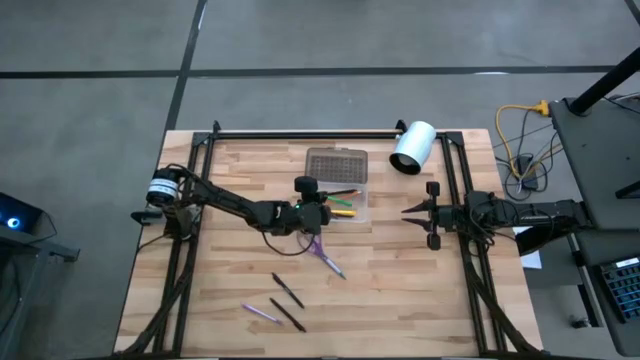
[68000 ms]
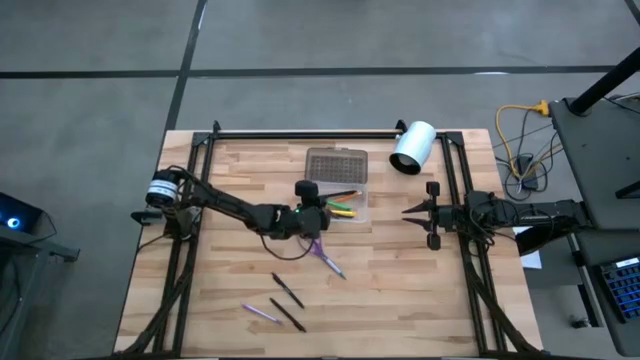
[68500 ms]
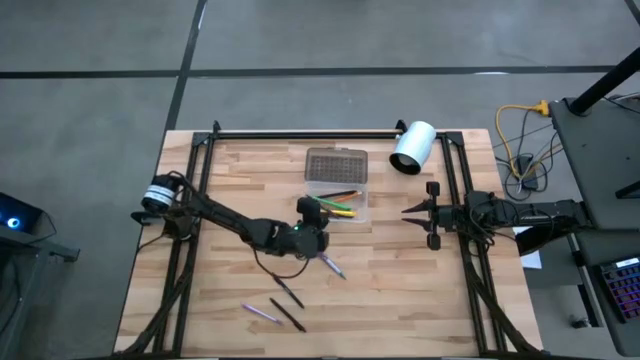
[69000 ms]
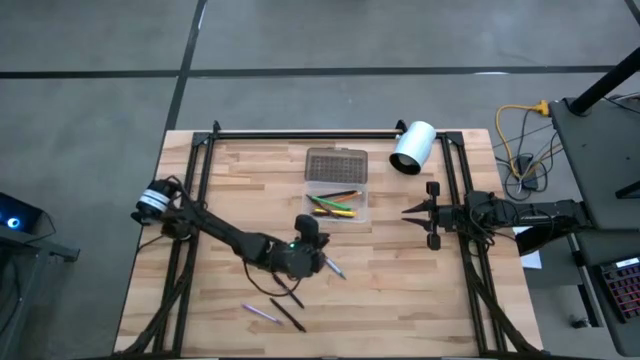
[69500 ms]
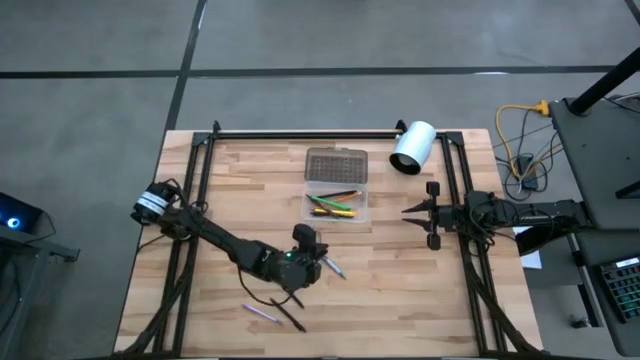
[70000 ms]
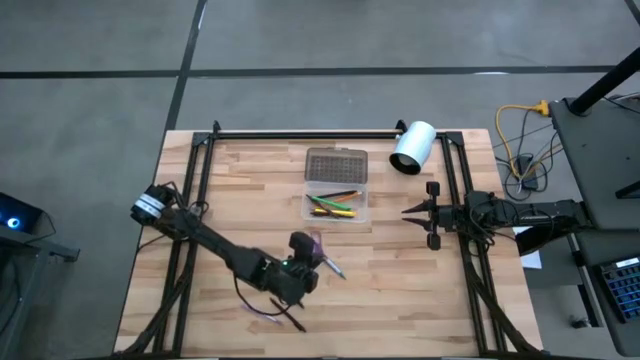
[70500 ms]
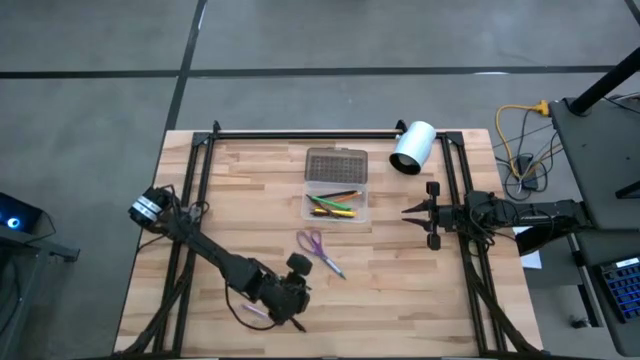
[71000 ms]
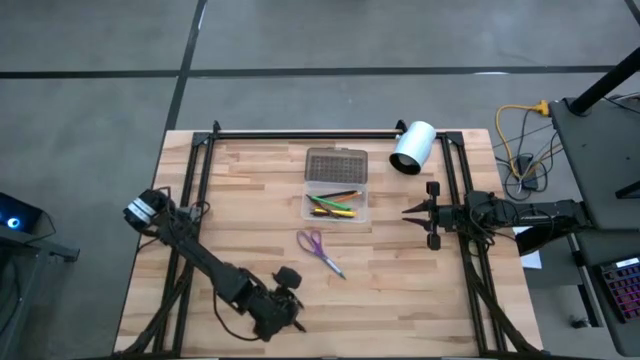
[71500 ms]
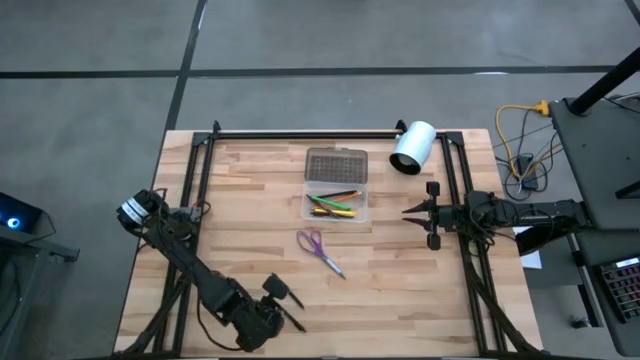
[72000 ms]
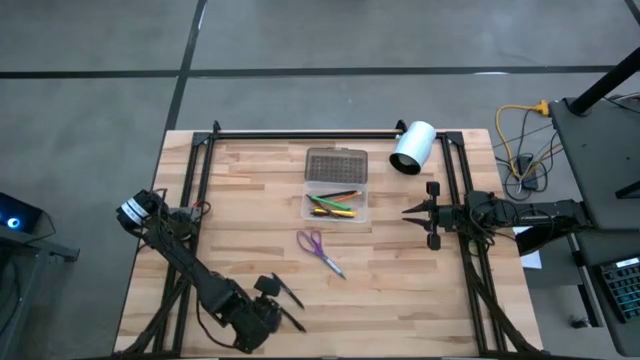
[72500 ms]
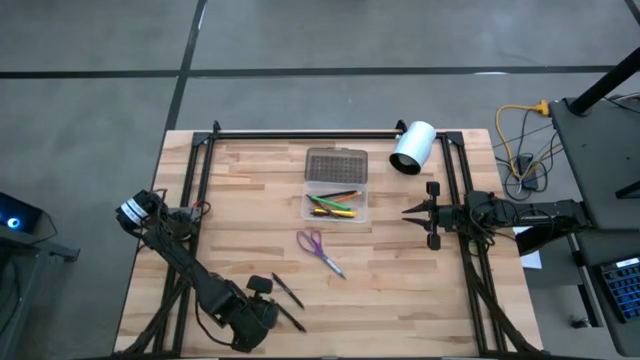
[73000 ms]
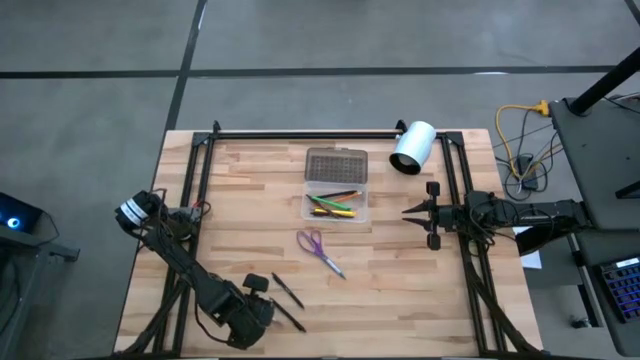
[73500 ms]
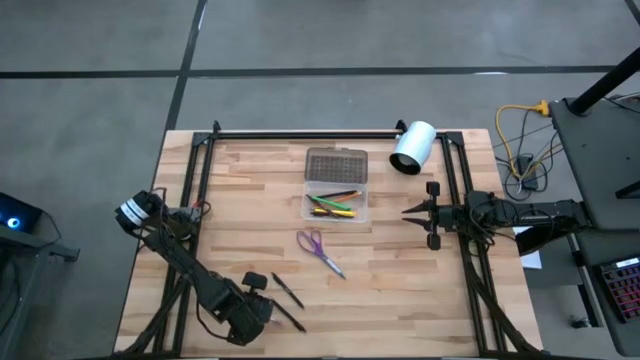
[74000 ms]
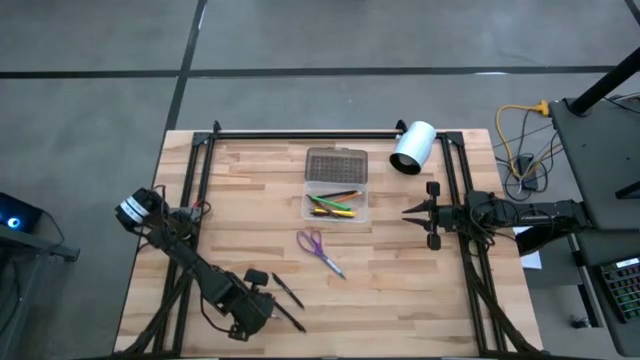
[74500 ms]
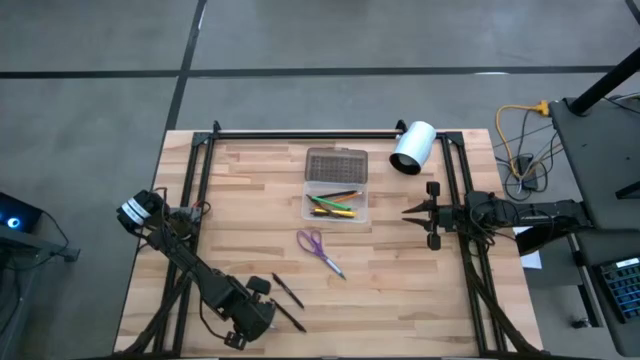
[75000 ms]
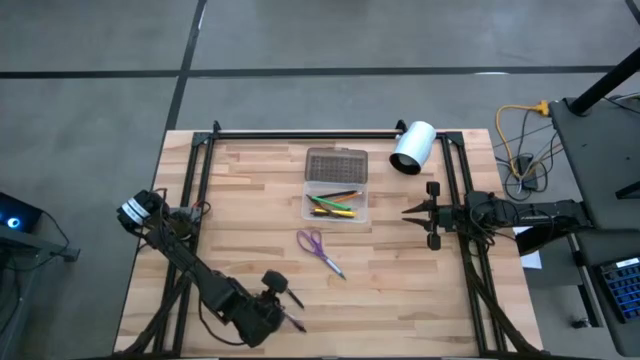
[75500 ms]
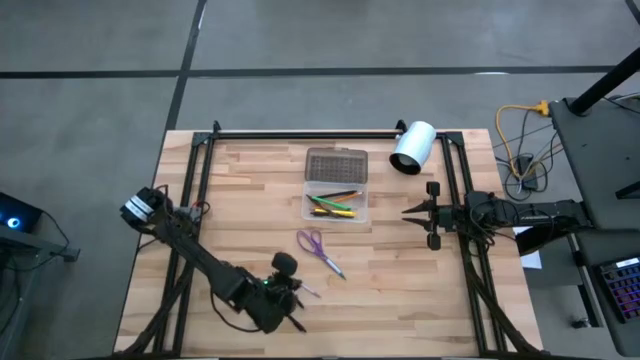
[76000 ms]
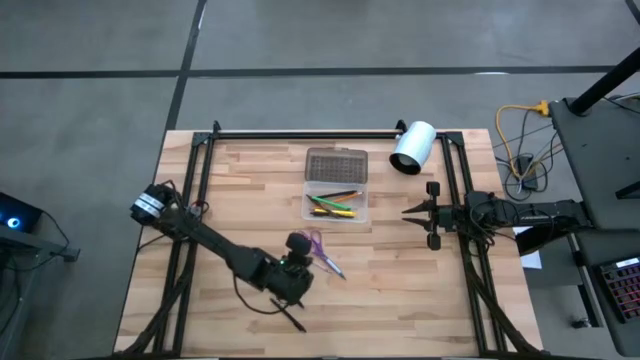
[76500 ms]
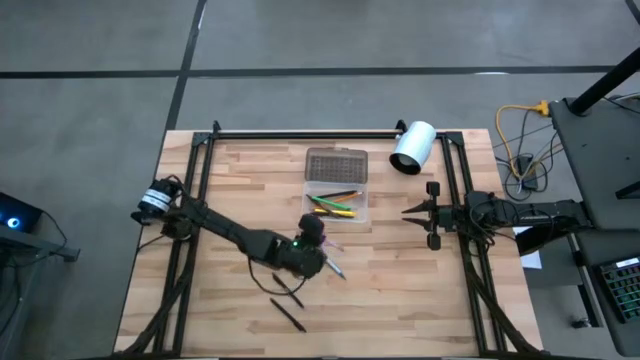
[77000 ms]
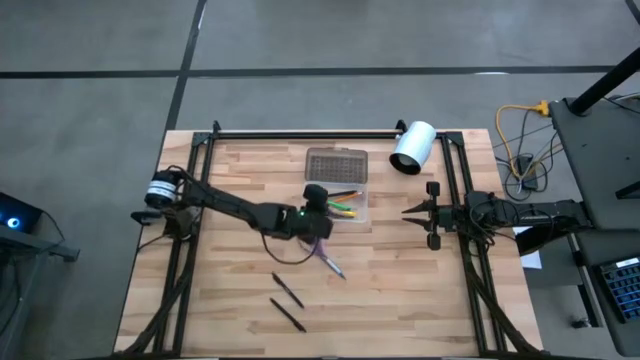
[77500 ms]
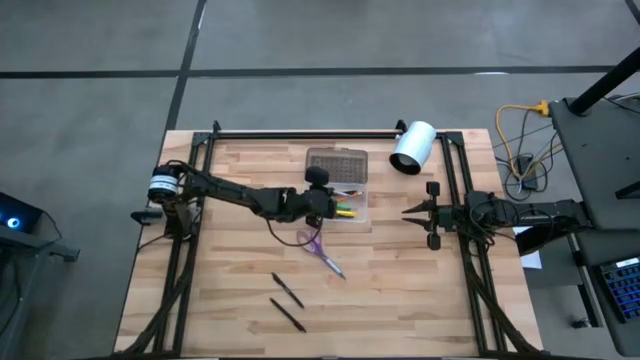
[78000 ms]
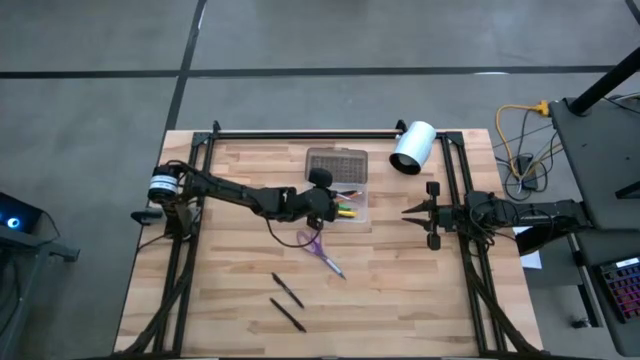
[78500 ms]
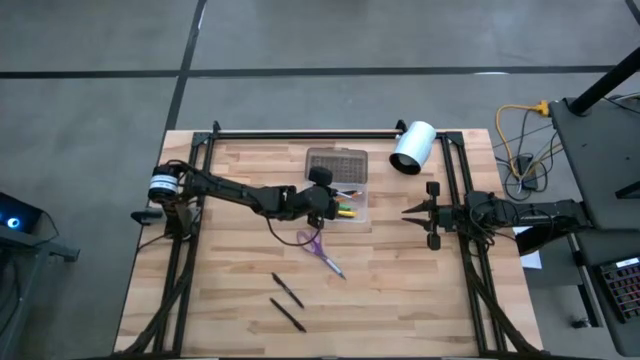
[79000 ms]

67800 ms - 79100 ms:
Task: Pick & place school supplies into a supply box
Put the purple pen into the transparent bin

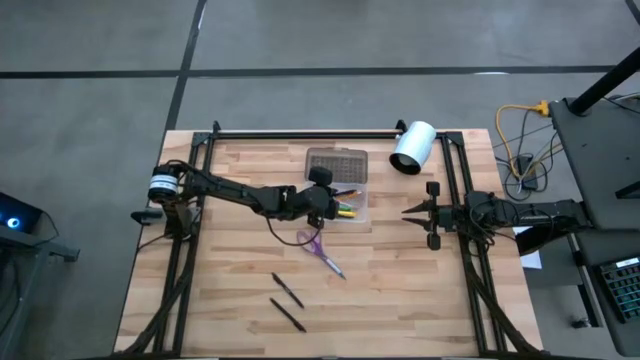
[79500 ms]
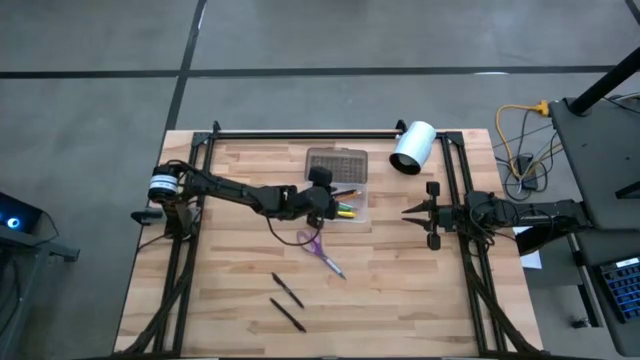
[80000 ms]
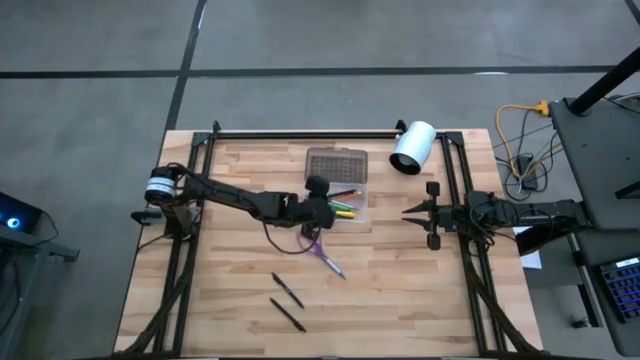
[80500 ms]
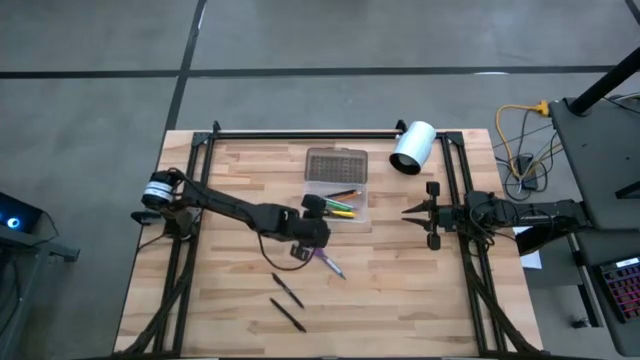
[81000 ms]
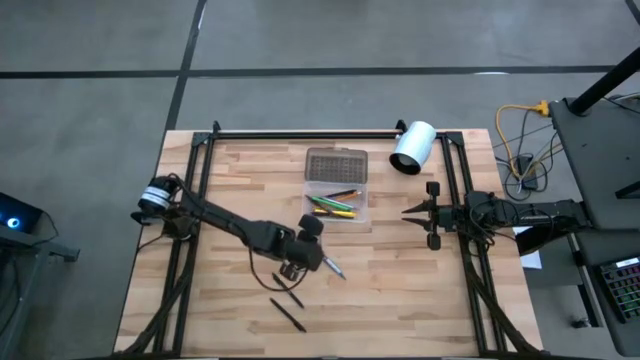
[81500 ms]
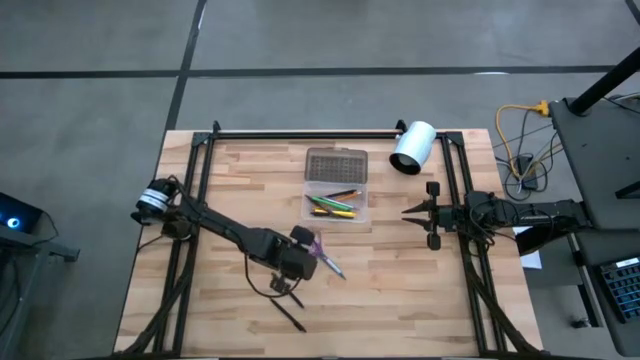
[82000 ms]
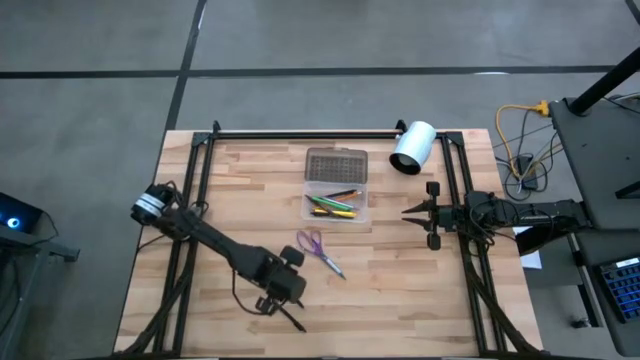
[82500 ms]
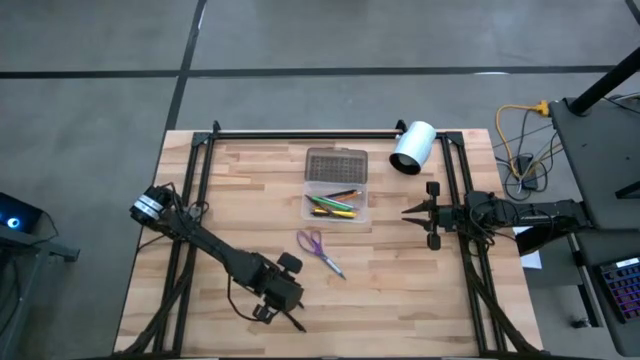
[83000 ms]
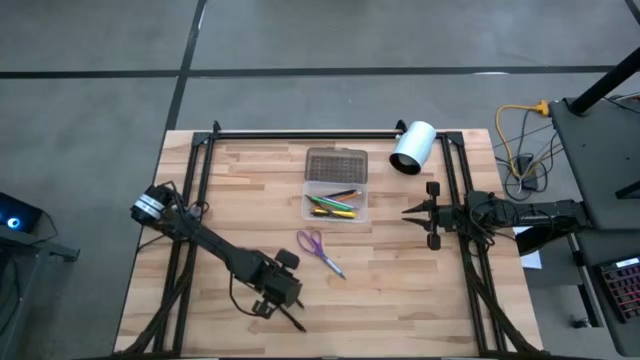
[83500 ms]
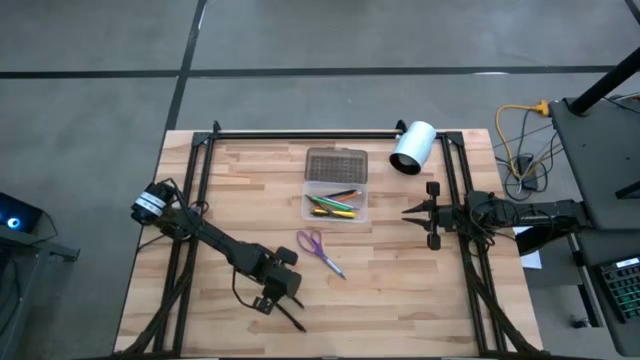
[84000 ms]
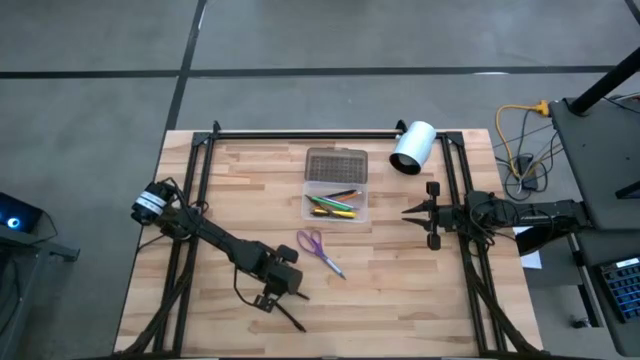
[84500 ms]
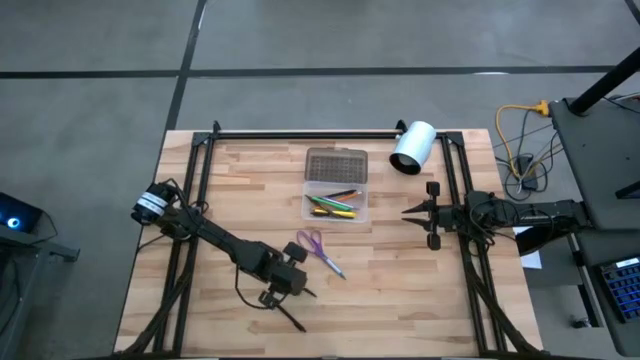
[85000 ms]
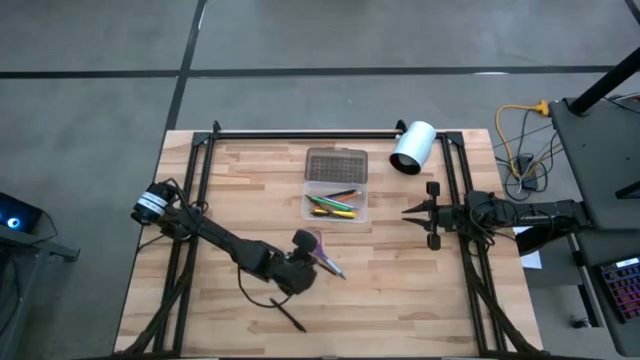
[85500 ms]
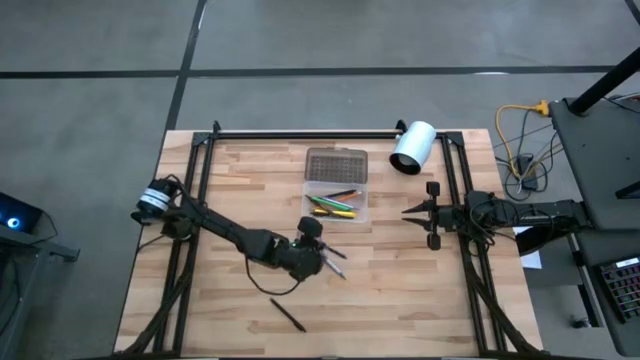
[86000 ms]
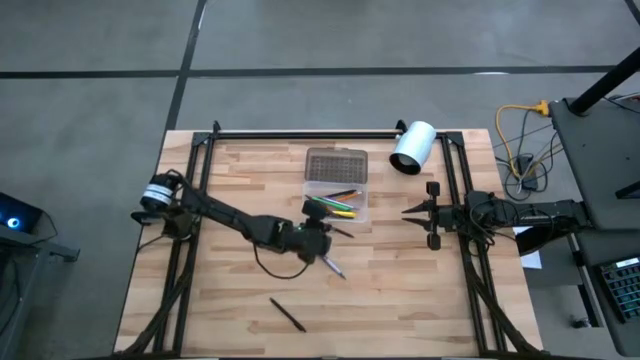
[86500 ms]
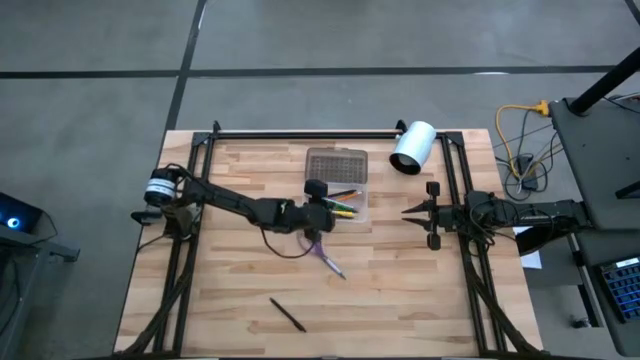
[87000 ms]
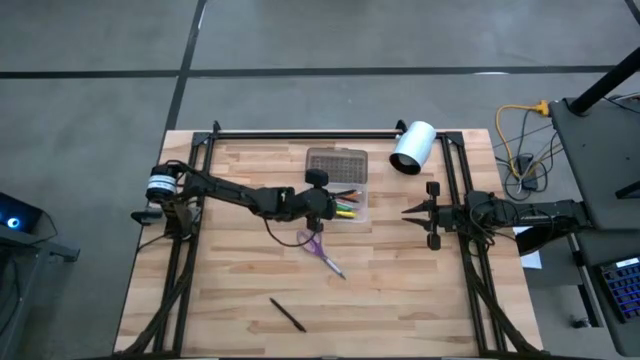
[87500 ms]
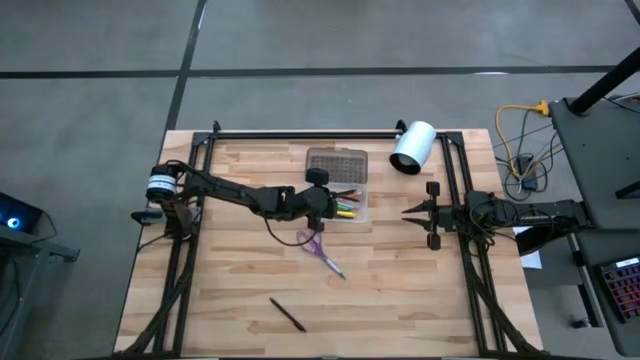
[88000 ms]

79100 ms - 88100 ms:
Put the top black pen into the transparent bin

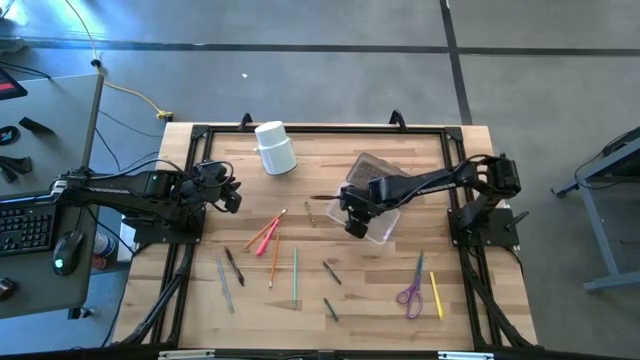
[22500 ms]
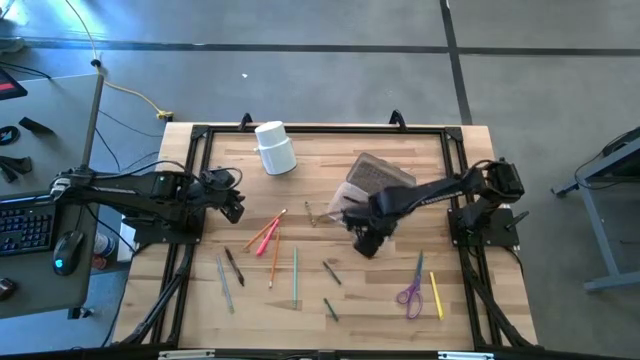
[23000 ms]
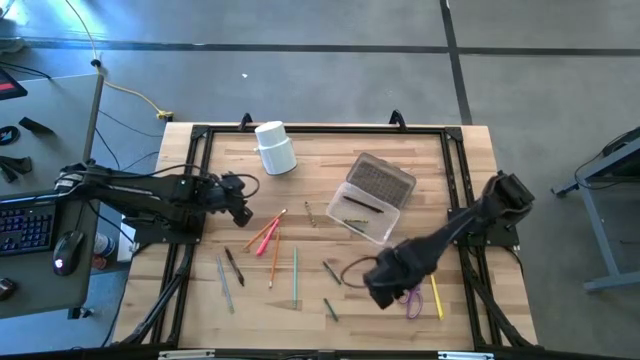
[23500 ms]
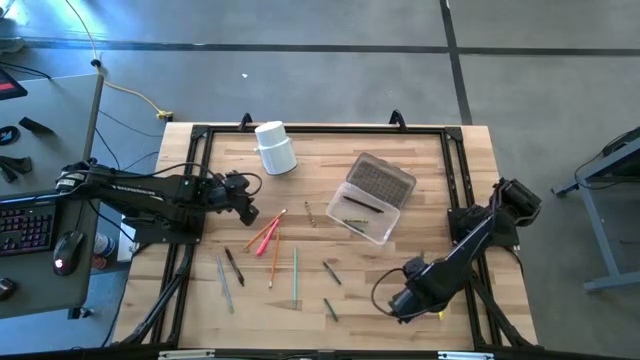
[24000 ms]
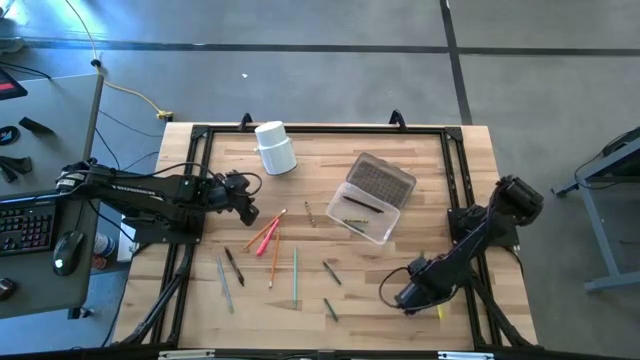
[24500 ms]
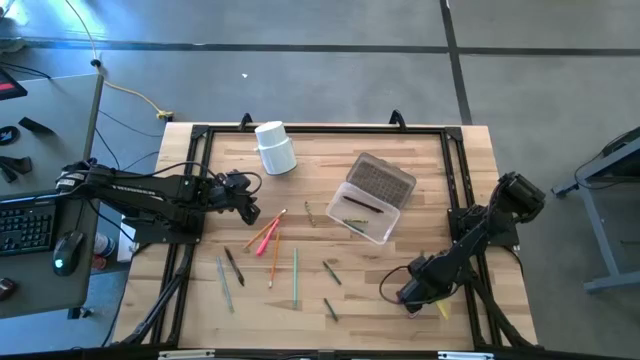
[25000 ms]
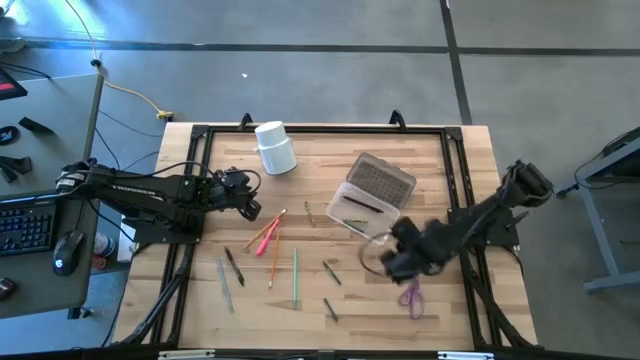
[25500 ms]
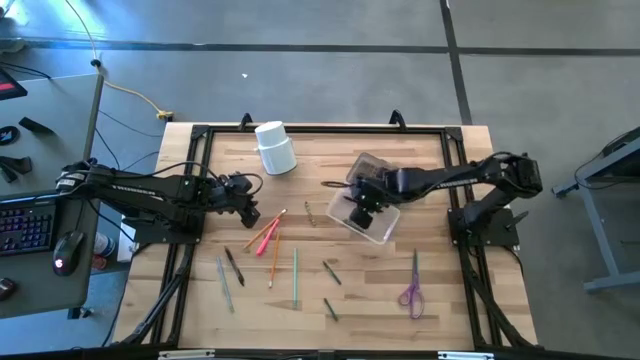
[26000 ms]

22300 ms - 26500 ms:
Task: Pick & place school supplies into a supply box
Put the yellow pen into the supply box
